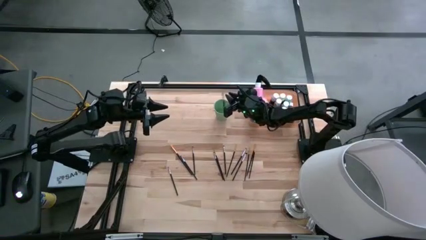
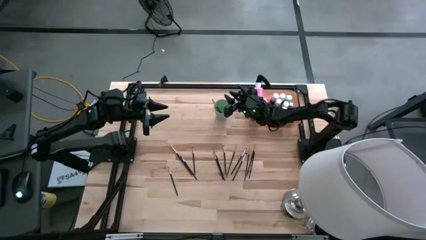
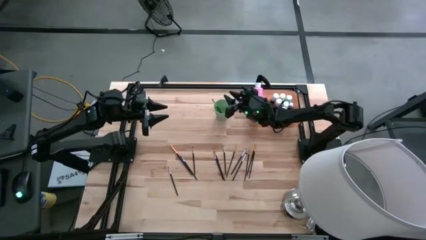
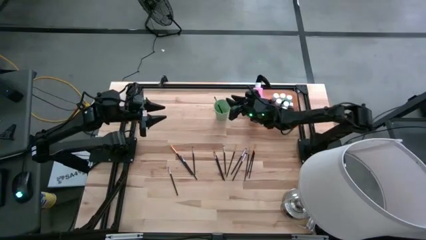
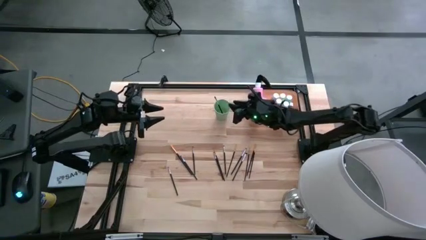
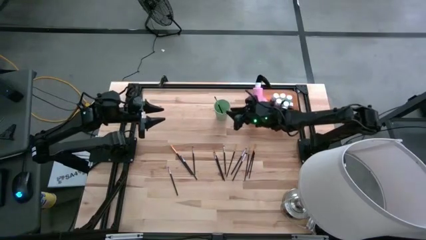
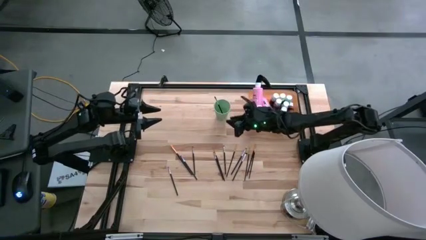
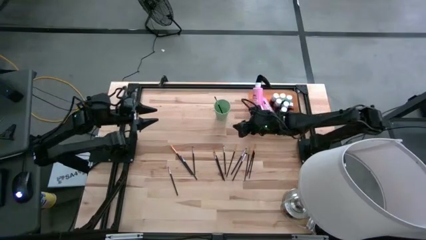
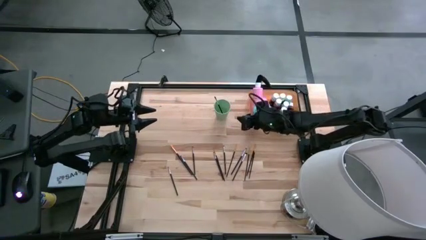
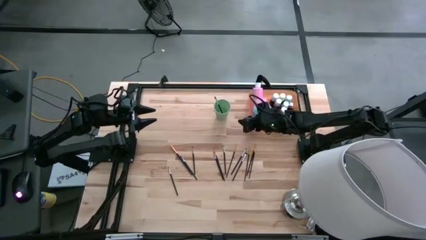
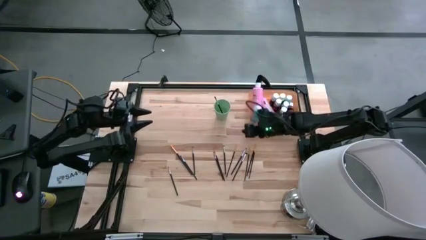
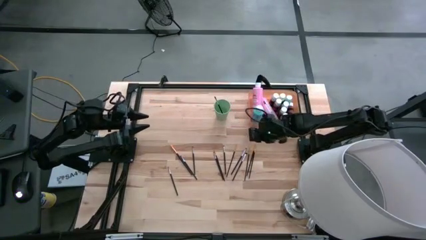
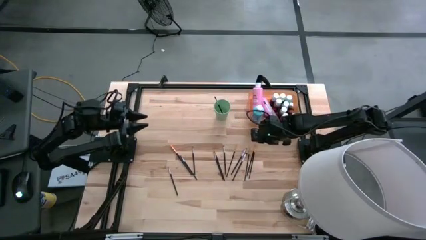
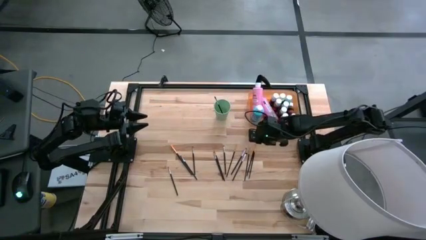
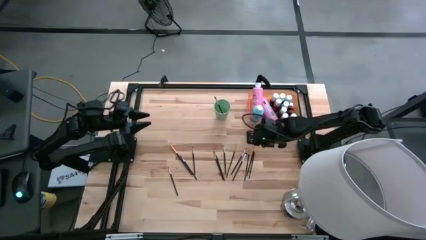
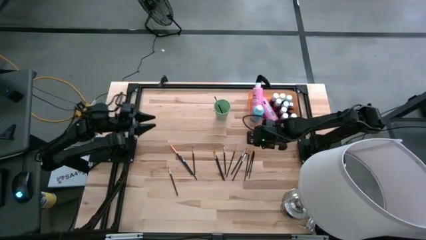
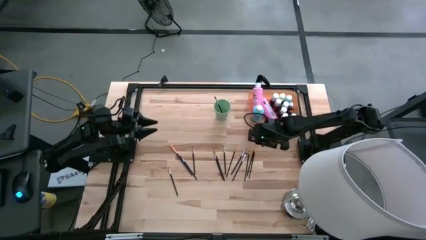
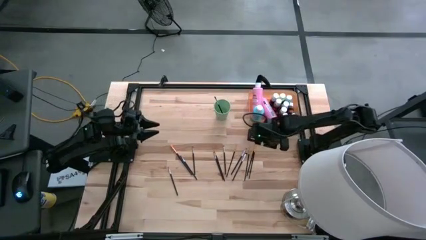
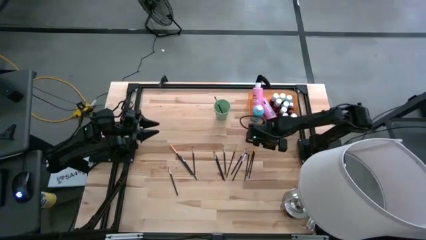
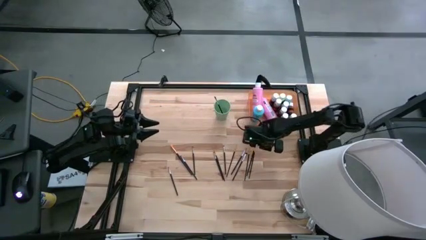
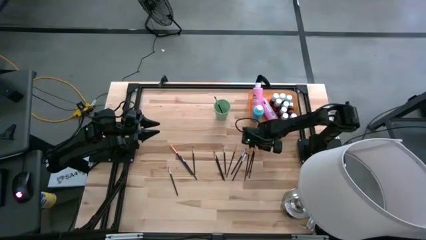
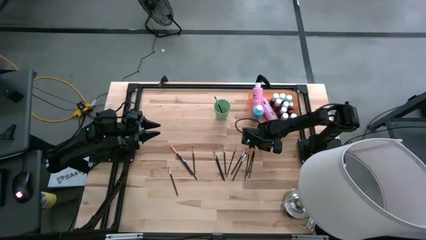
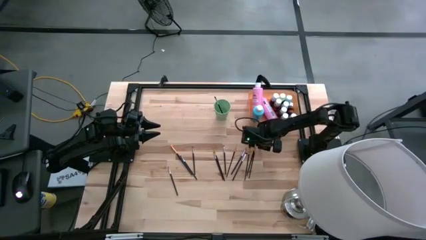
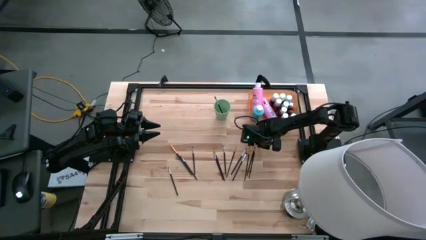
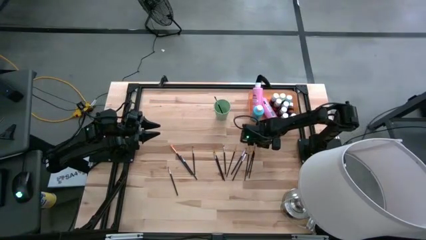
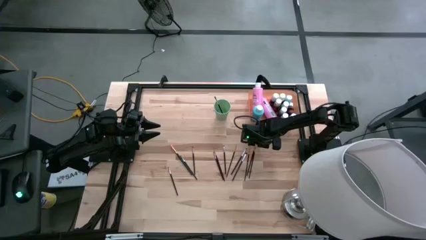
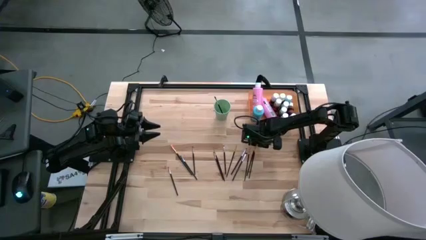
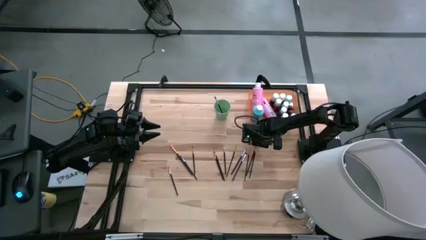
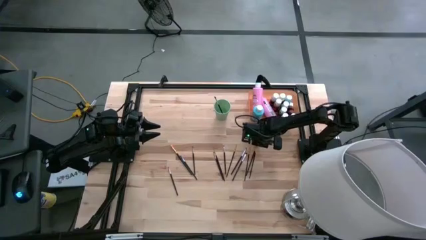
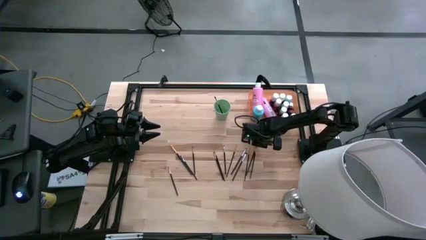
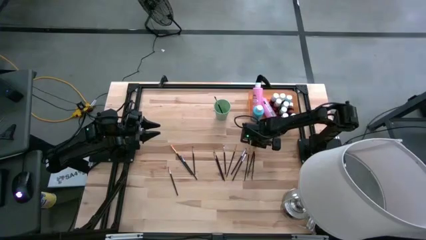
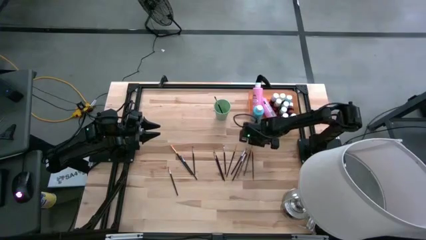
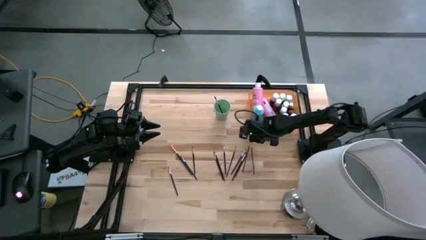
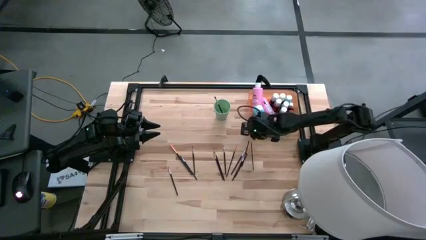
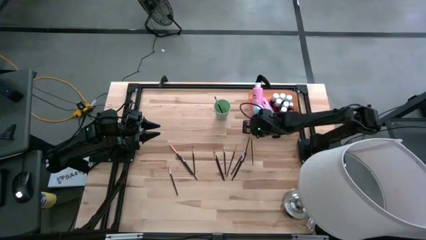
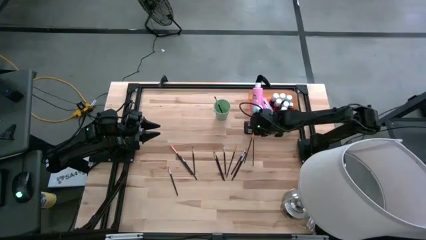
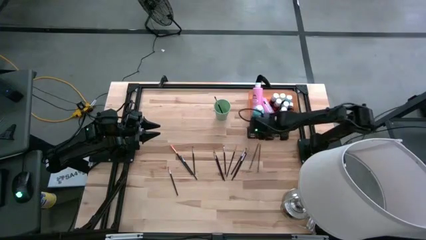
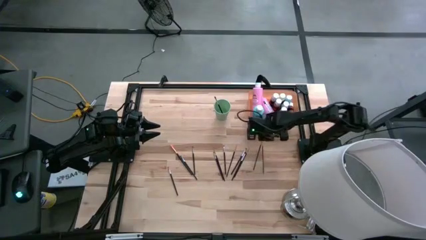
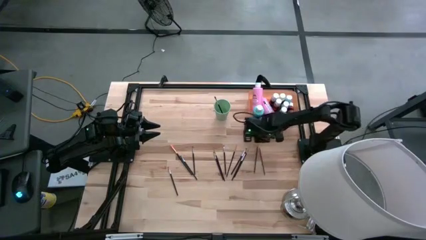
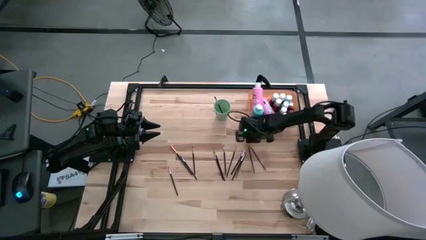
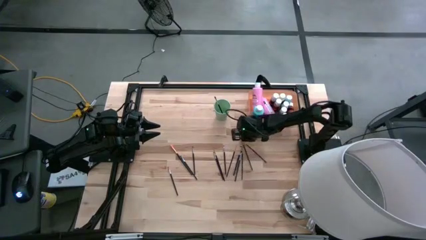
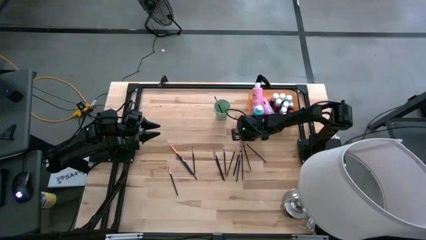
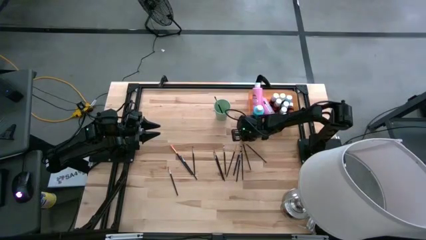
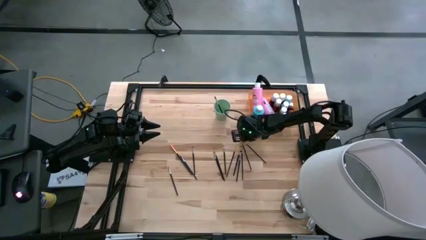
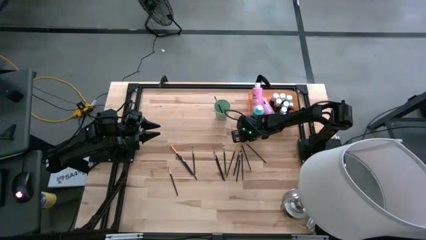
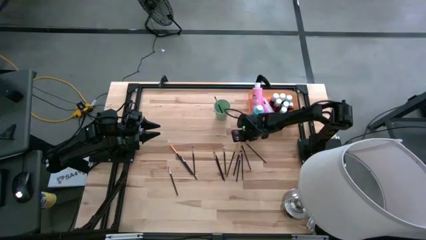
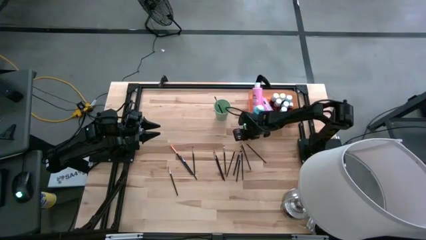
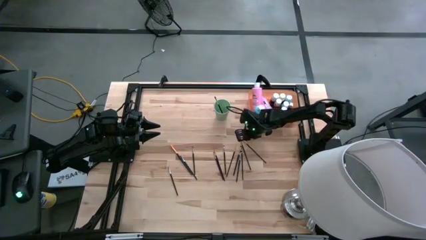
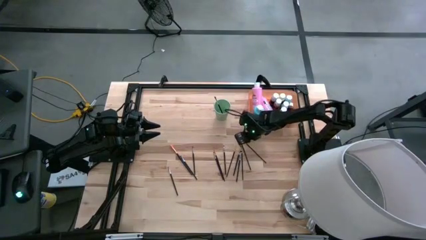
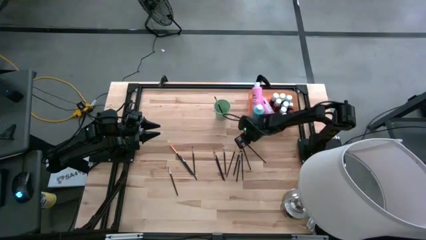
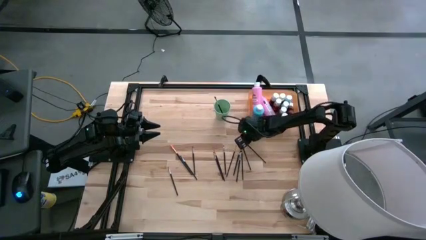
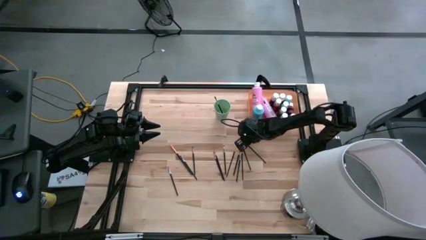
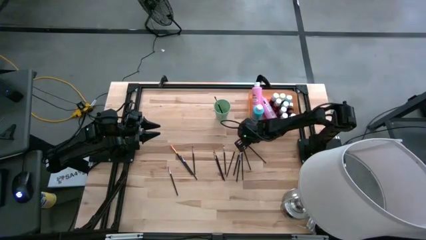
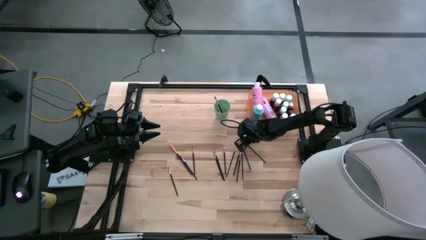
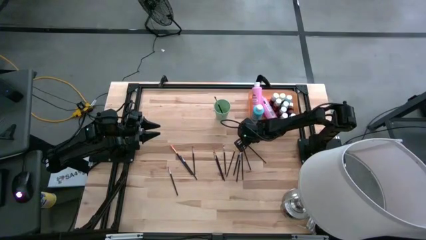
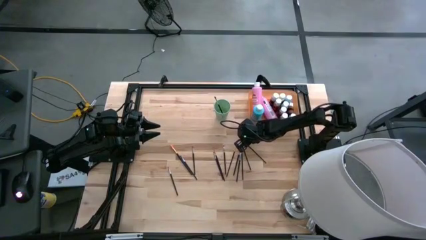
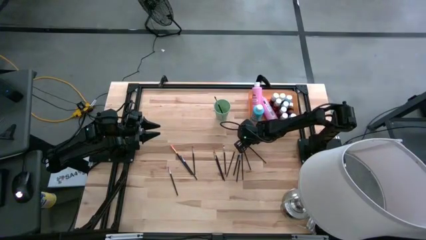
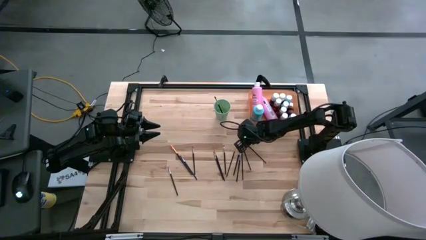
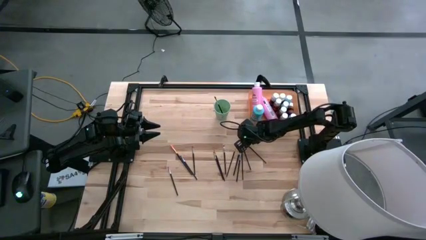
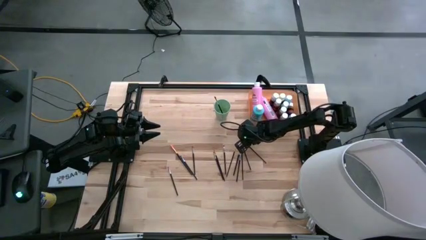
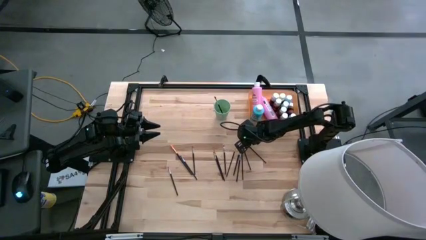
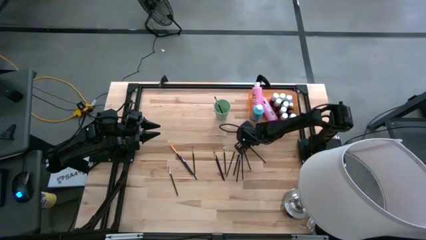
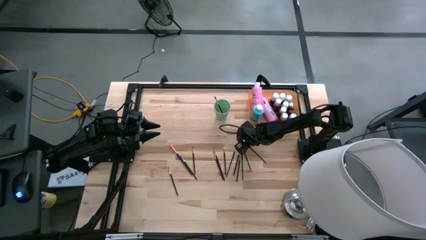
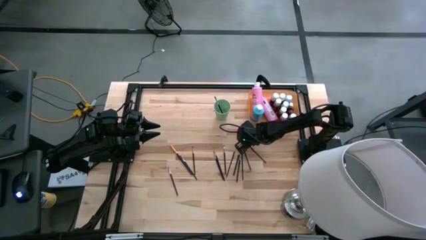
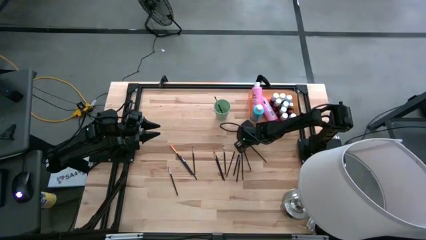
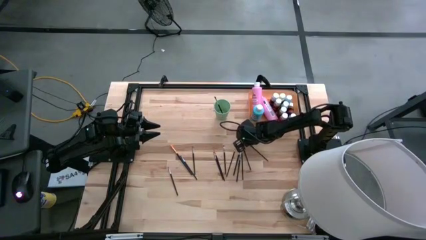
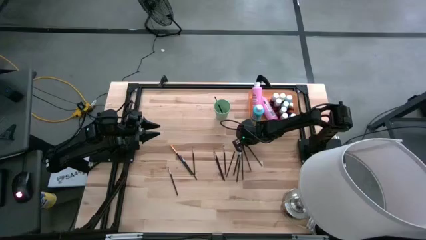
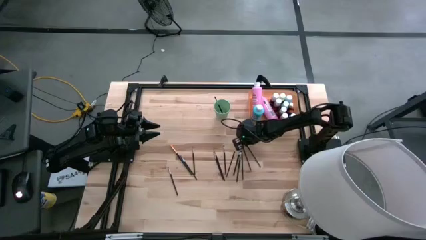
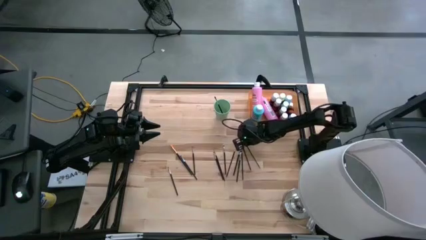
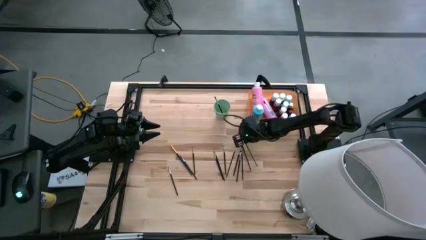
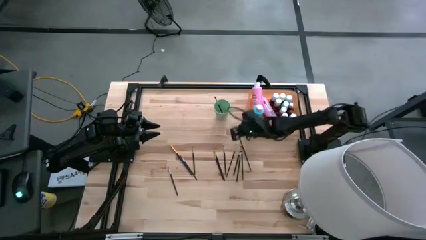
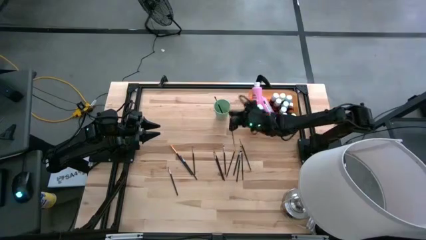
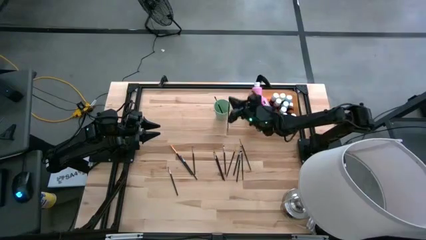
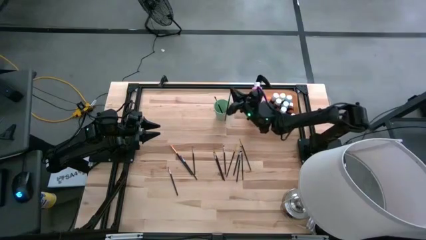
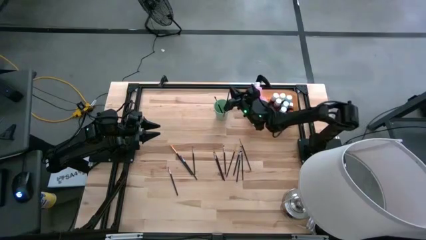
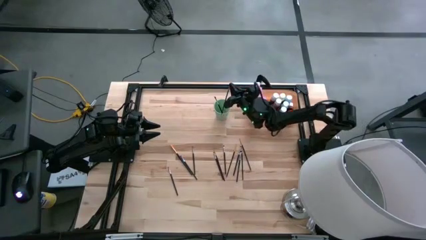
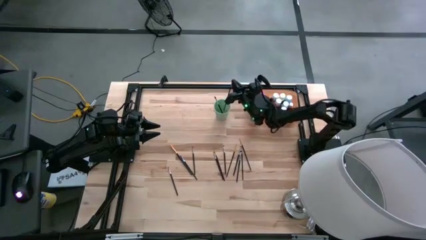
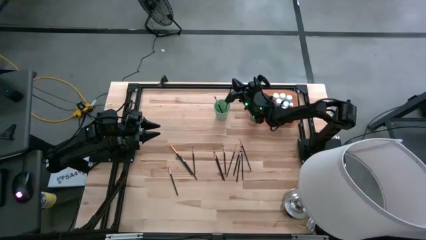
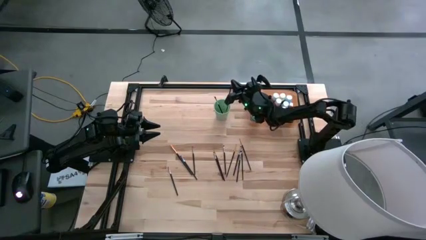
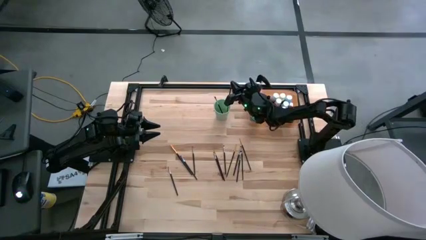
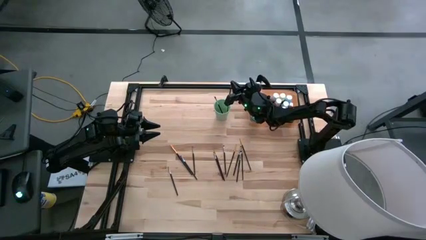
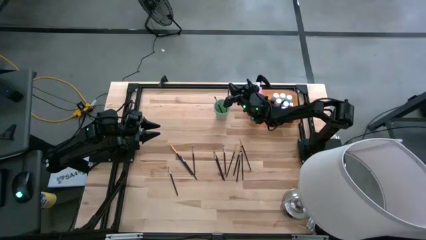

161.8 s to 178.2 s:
Task: Pick & Place Paint Supplies
Put the gold paintbrush into the green cup
